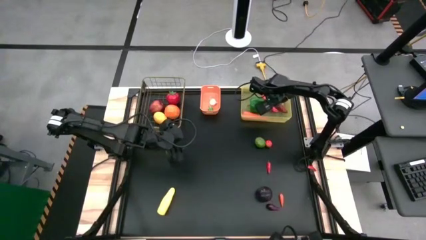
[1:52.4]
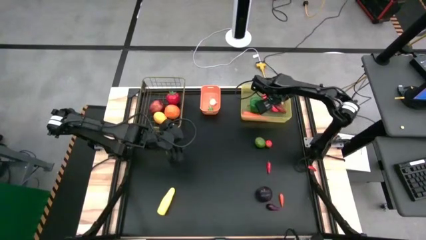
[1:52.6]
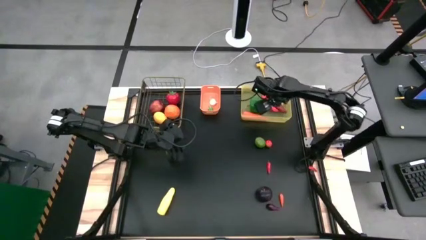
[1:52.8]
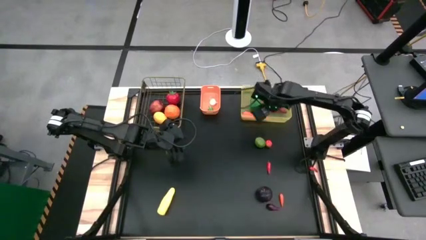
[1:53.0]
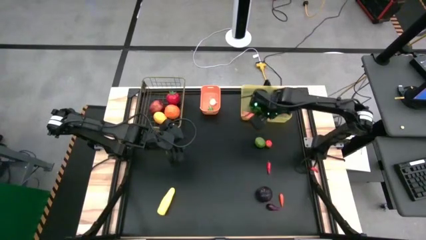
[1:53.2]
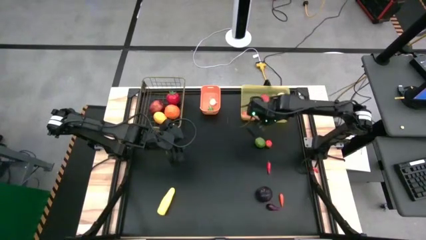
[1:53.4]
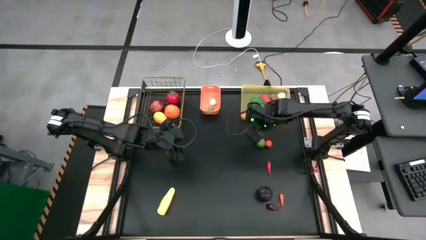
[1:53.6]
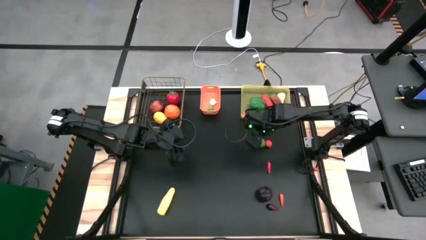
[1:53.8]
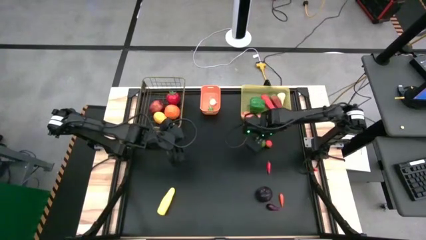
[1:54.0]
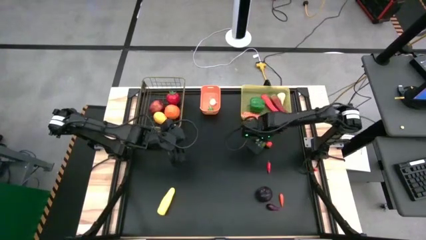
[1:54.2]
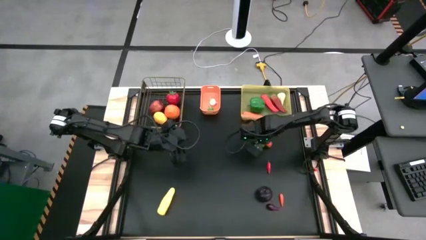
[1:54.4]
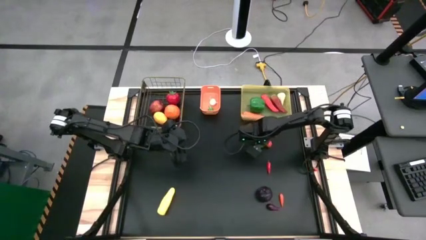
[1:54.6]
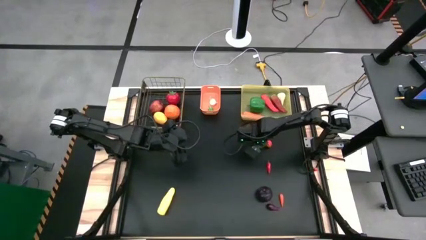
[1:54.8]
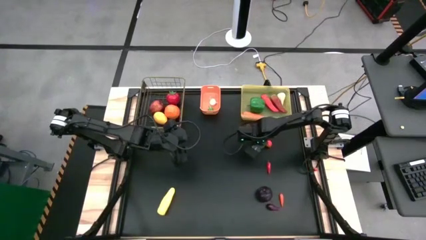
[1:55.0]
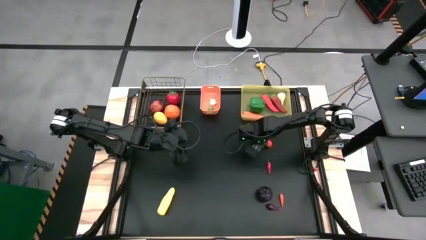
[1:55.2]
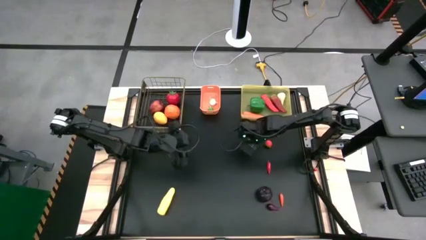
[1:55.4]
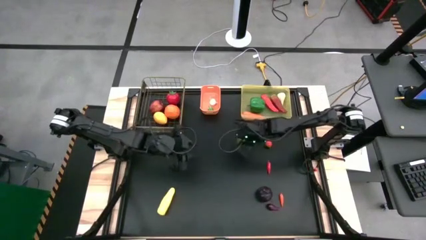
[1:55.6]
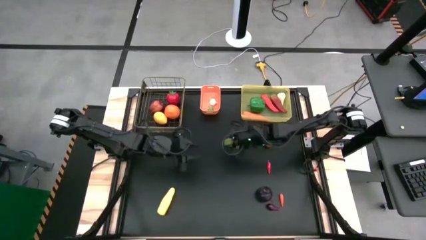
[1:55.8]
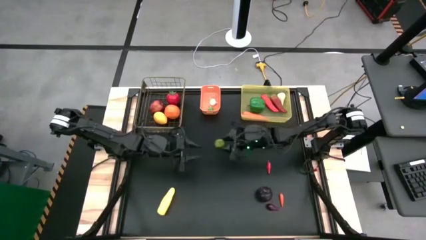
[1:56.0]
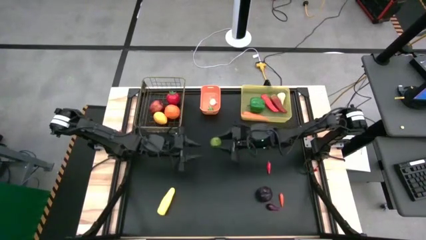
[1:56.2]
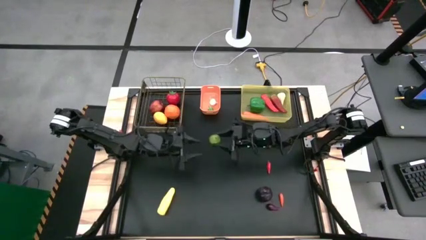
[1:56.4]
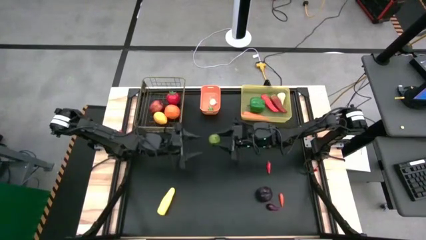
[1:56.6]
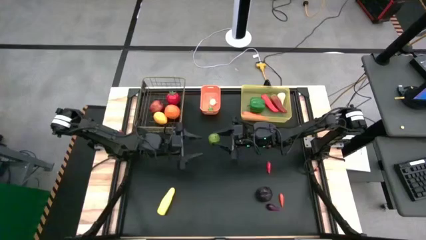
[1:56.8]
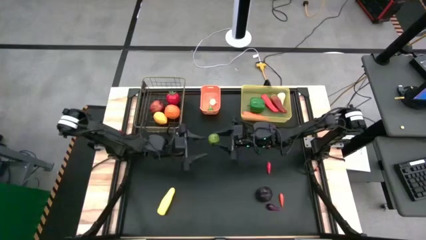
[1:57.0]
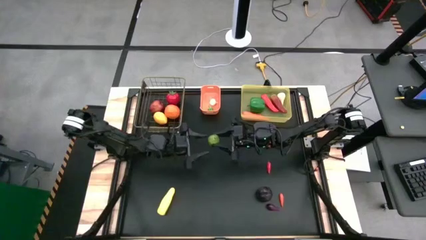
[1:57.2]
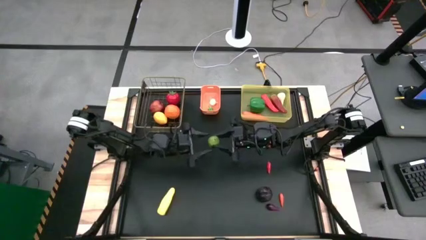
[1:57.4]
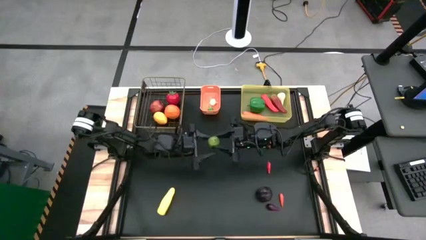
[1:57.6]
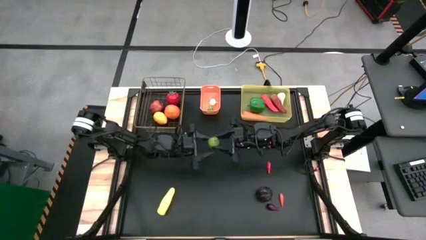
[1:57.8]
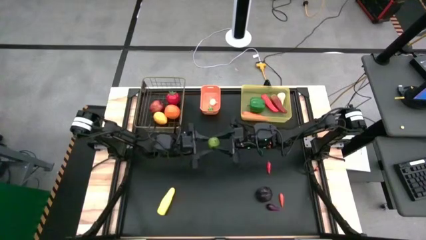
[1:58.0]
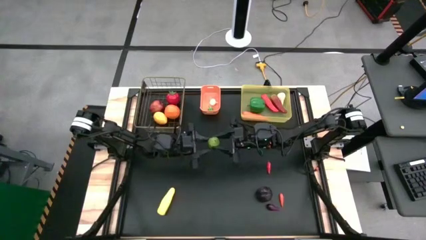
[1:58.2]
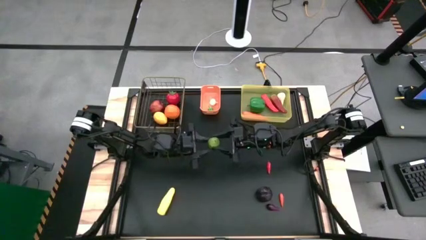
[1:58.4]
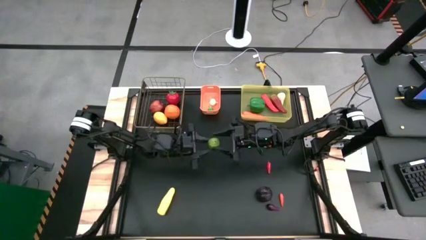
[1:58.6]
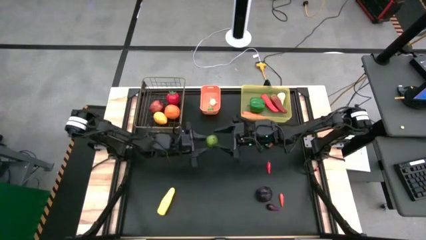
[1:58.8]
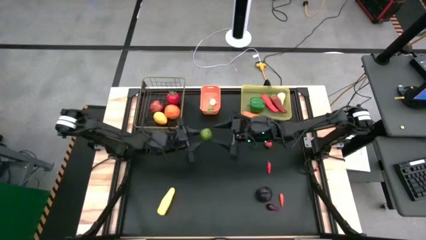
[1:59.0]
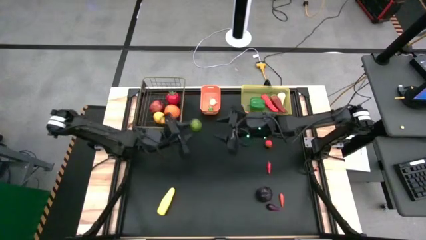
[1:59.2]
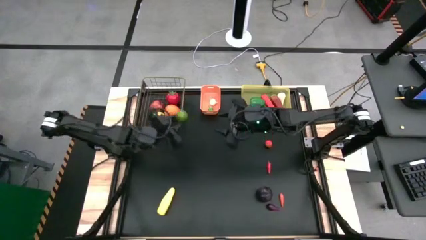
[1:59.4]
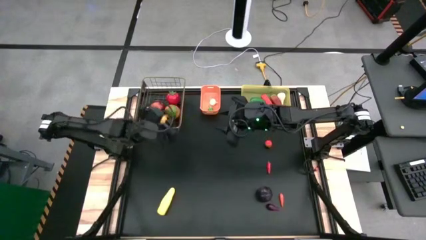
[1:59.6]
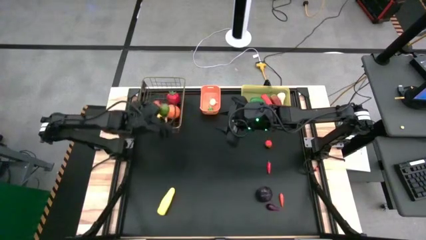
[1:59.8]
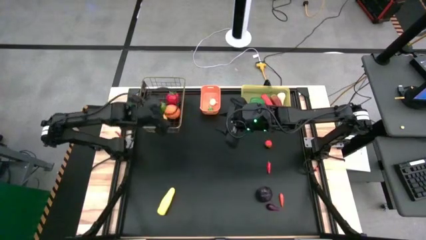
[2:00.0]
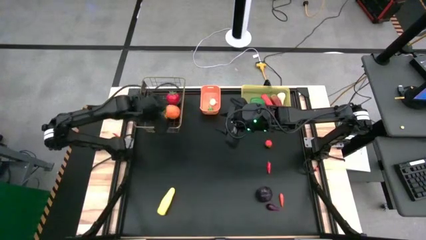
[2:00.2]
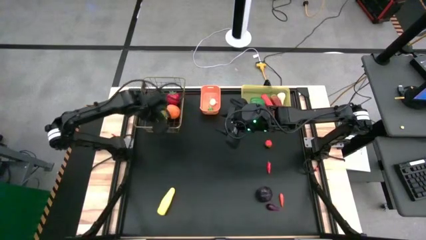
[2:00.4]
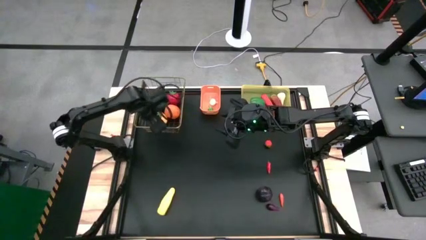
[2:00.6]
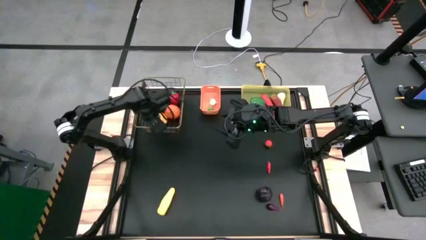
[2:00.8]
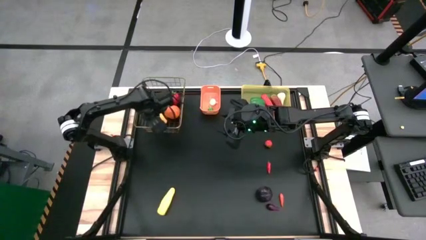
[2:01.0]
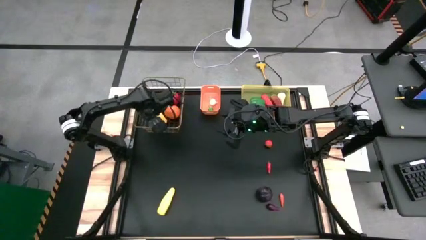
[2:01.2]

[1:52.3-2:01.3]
Task: Sort produce into baskets
Put the green lemon into the wire basket

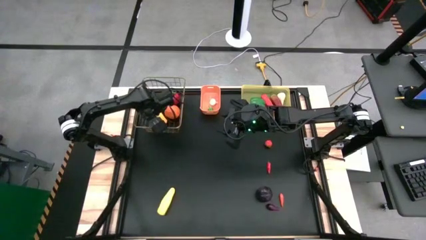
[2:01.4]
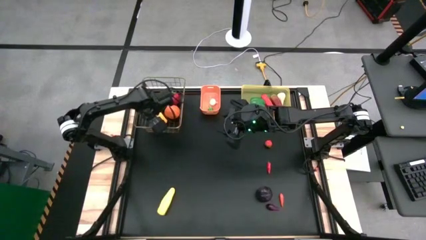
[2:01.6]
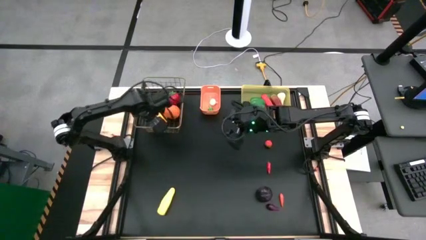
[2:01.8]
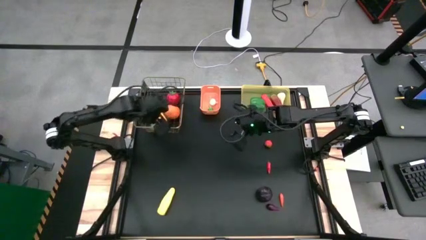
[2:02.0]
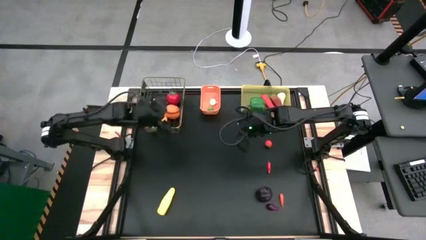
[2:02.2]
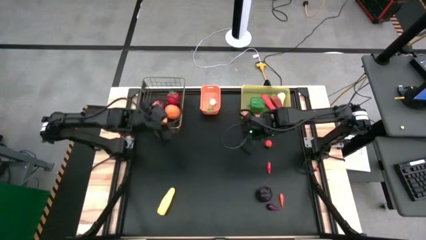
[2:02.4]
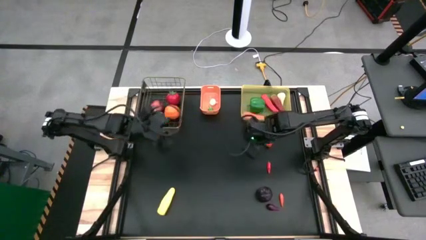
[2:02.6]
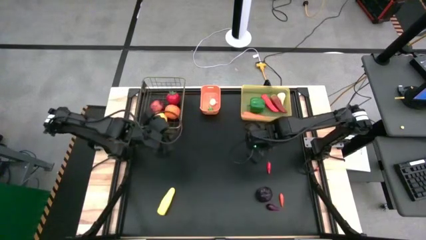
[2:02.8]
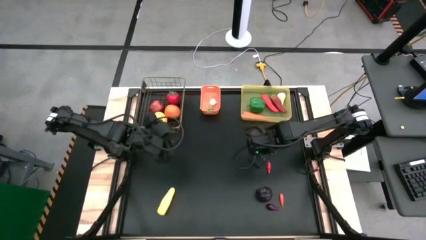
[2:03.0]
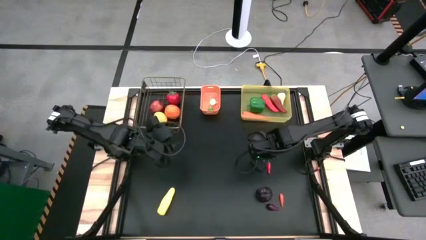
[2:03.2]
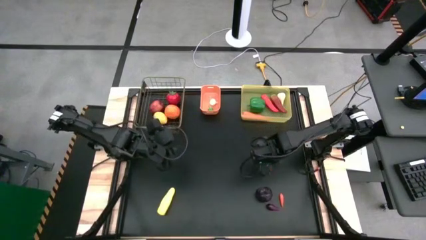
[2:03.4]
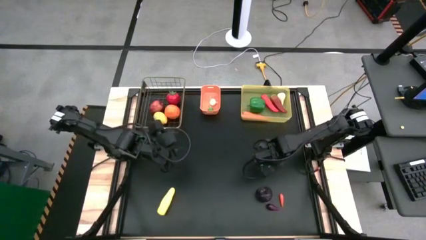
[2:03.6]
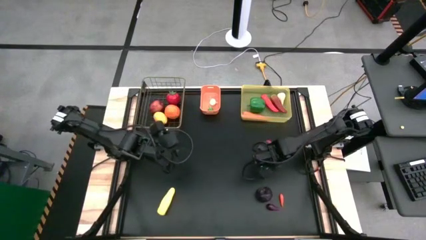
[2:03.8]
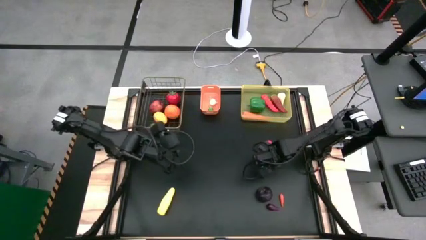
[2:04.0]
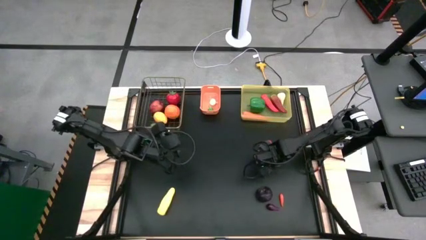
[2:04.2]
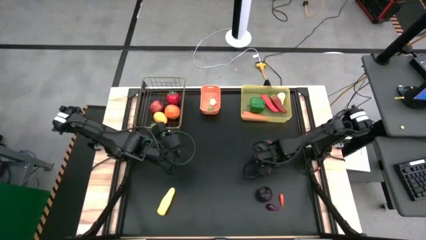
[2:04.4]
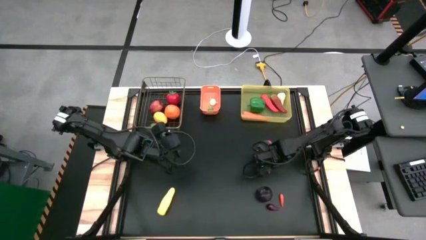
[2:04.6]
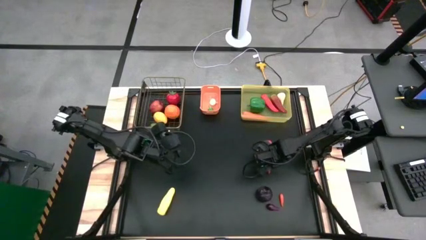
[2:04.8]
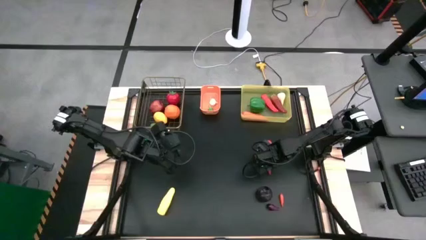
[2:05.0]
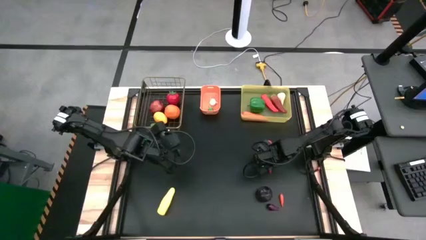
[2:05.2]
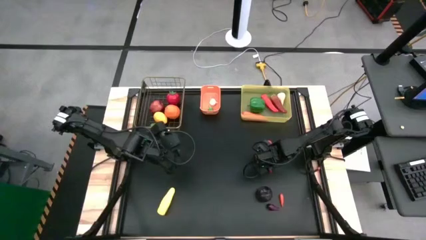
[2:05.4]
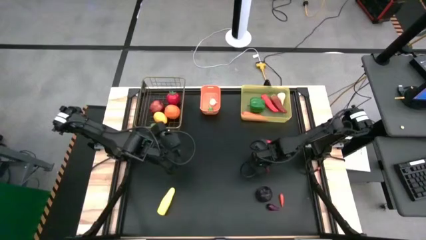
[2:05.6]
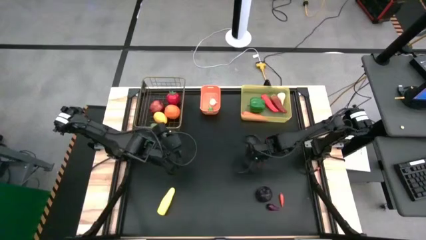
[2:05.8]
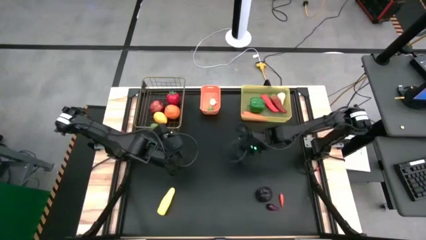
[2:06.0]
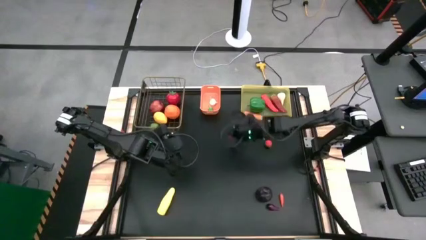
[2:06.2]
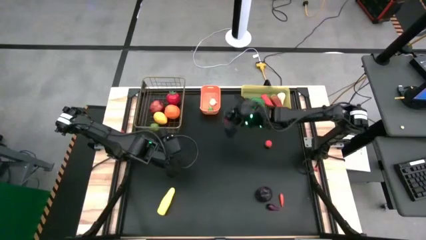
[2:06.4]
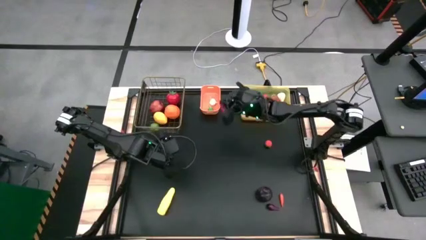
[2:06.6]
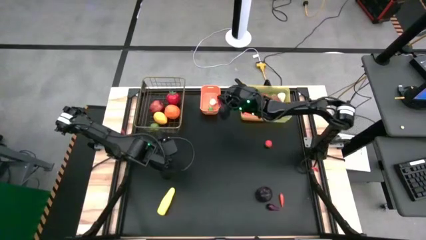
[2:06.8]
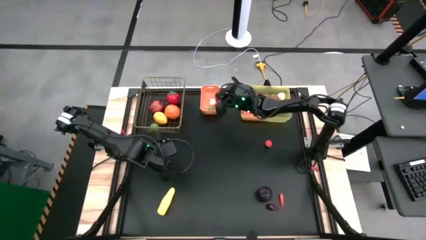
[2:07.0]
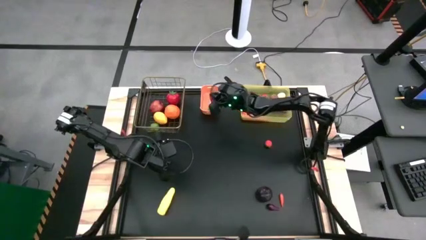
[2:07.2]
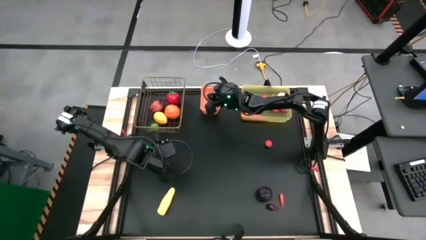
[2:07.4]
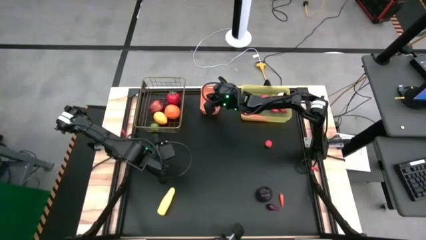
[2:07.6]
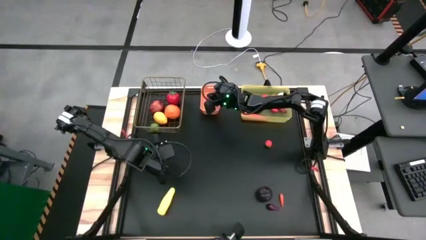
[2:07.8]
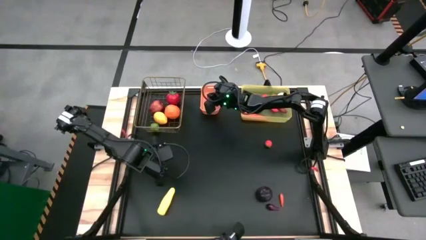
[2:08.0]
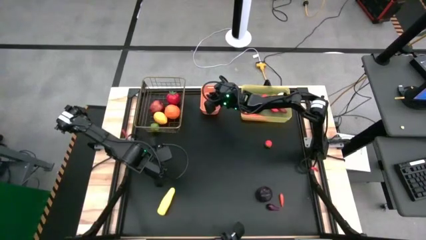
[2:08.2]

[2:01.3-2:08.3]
Put the small red chili pepper into the orange bin

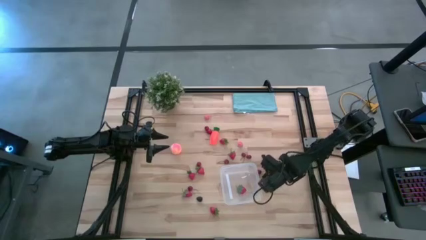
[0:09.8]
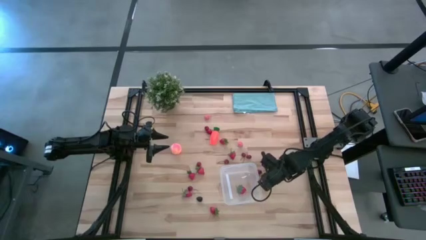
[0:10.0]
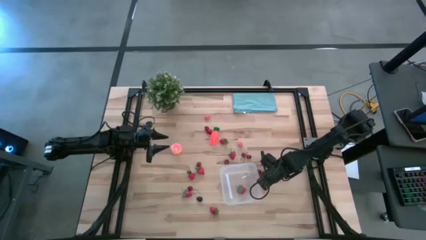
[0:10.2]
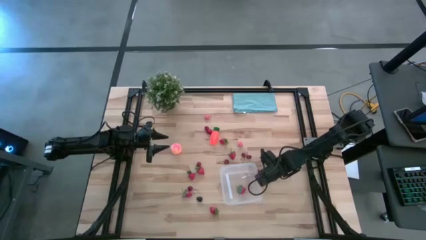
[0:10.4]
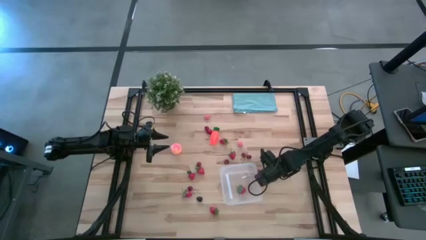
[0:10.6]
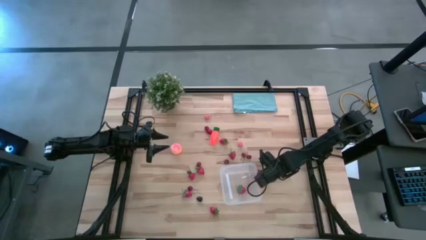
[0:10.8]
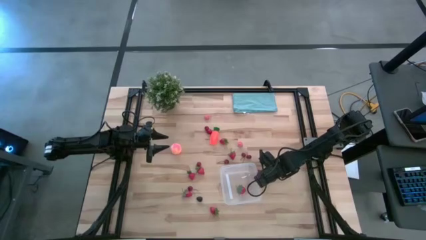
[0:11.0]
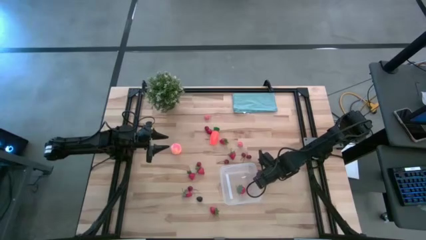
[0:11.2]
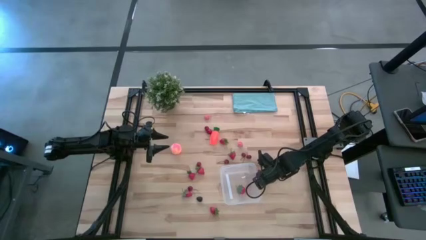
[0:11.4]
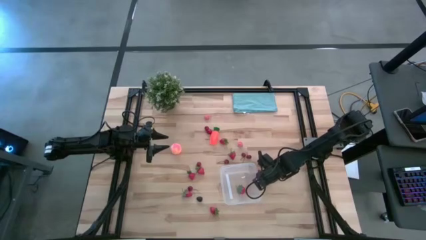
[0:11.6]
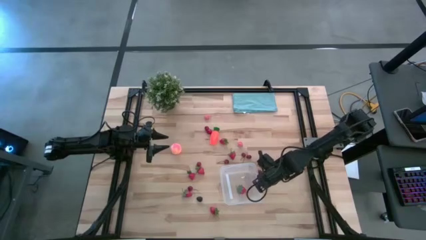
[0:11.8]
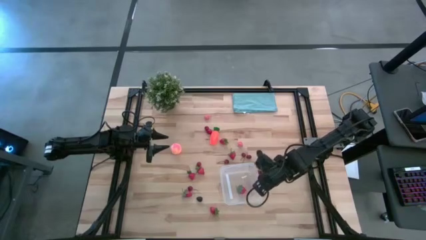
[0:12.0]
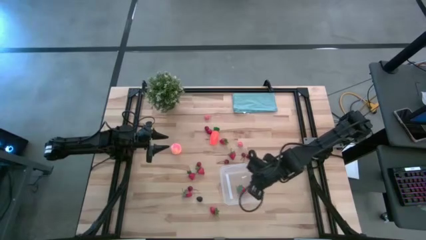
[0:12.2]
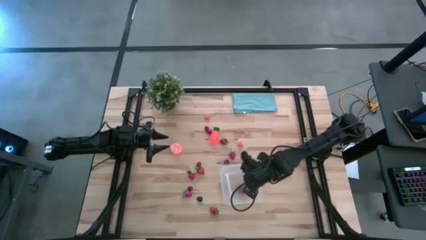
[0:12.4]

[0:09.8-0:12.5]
Task: Pick and placing Produce into tupperware
Put the pink peach into the transparent container
